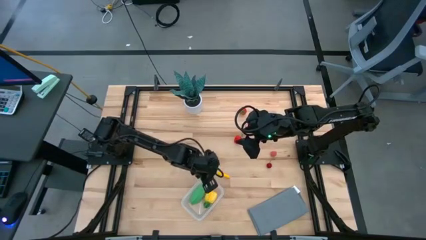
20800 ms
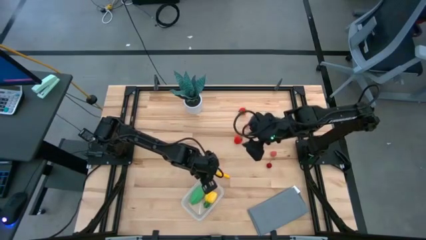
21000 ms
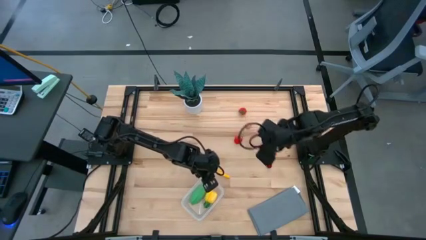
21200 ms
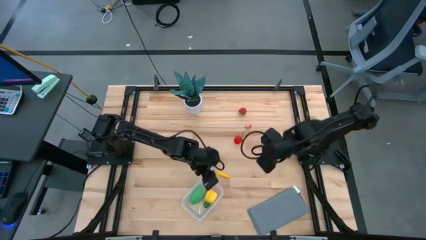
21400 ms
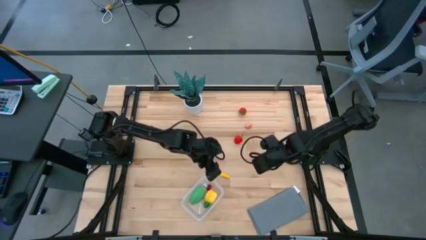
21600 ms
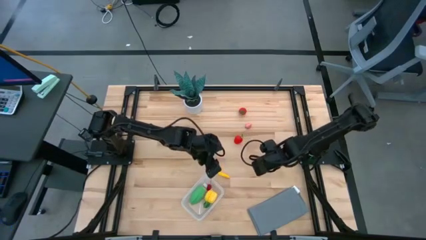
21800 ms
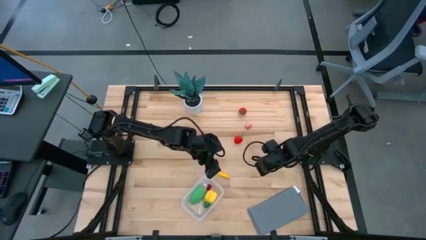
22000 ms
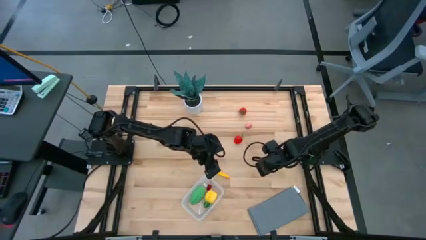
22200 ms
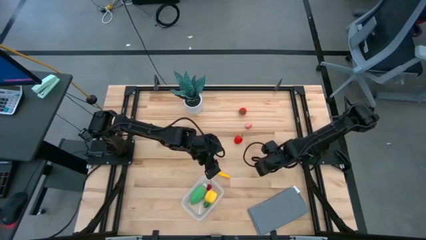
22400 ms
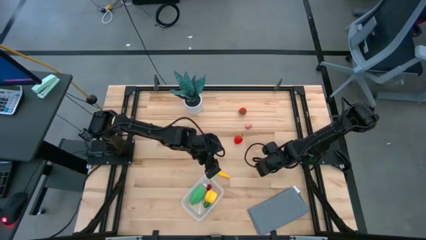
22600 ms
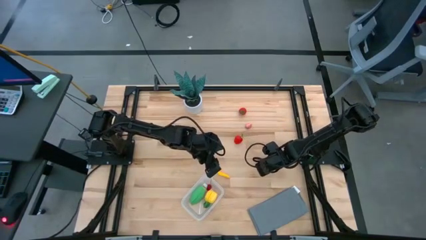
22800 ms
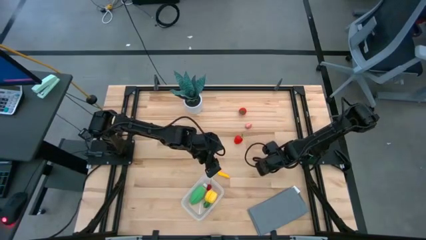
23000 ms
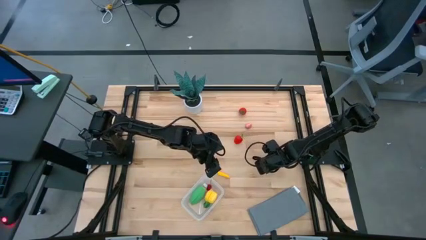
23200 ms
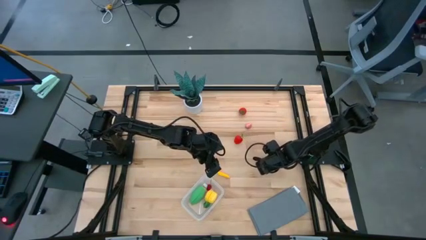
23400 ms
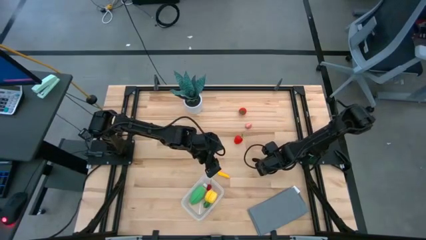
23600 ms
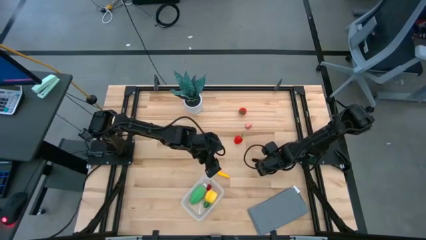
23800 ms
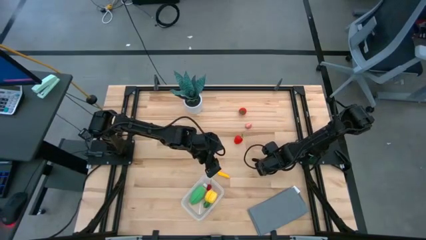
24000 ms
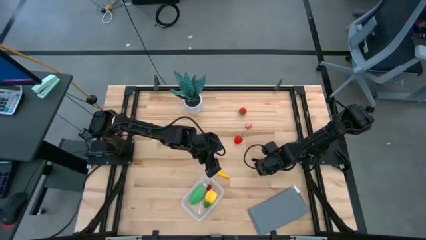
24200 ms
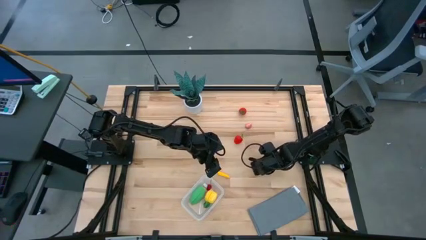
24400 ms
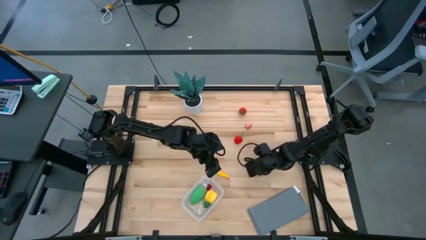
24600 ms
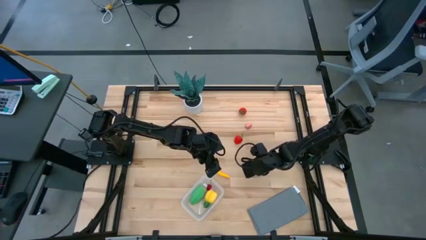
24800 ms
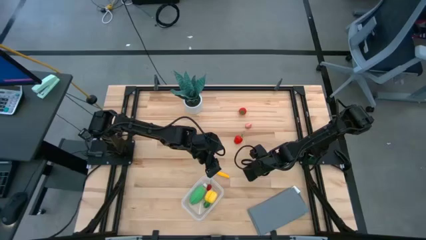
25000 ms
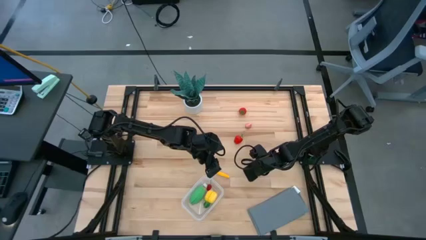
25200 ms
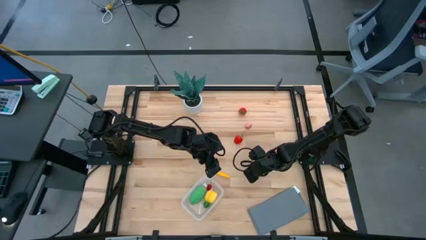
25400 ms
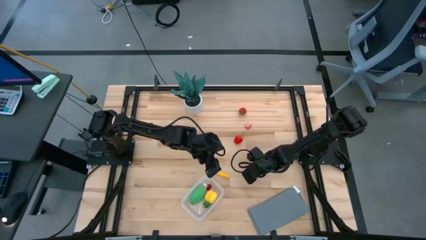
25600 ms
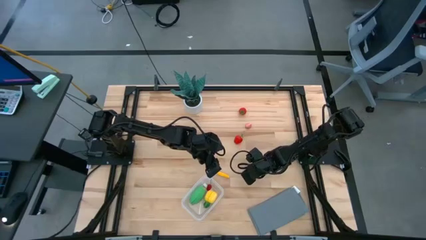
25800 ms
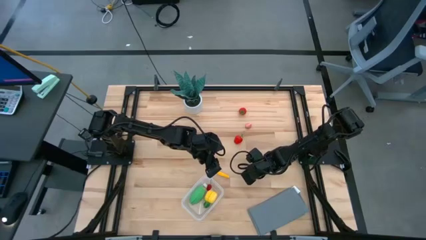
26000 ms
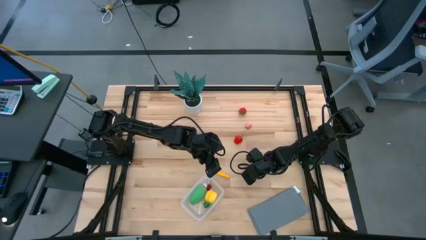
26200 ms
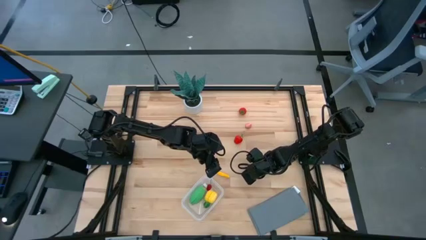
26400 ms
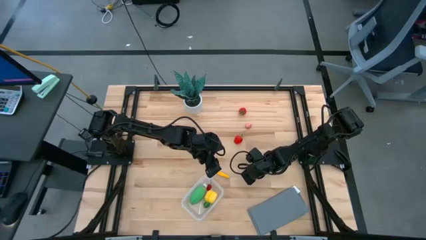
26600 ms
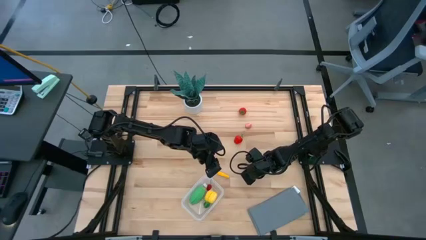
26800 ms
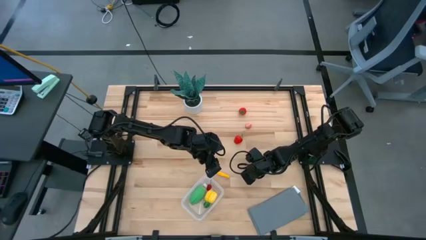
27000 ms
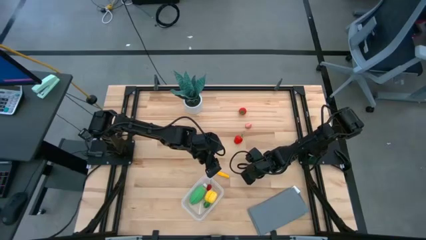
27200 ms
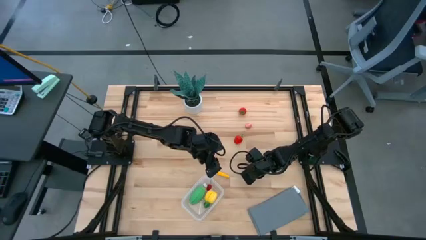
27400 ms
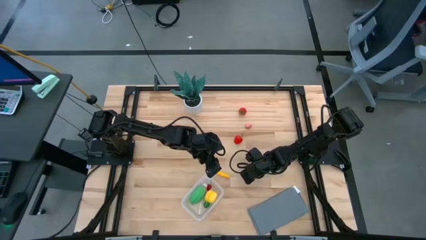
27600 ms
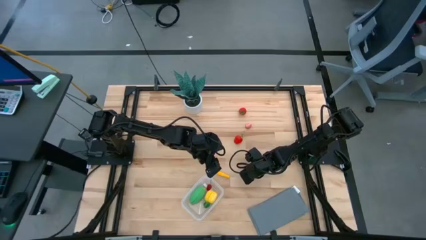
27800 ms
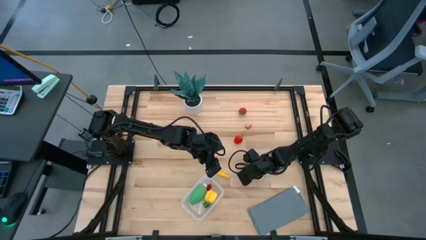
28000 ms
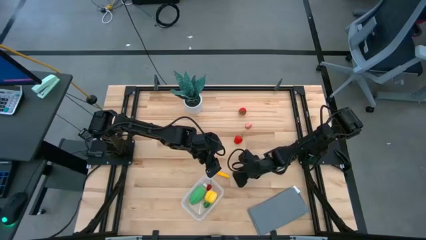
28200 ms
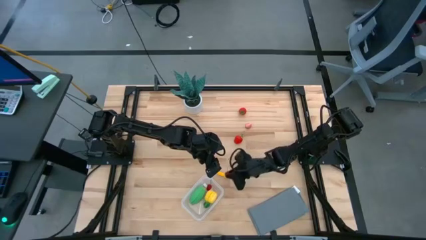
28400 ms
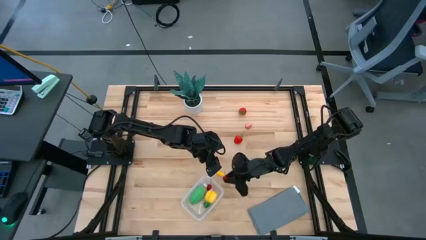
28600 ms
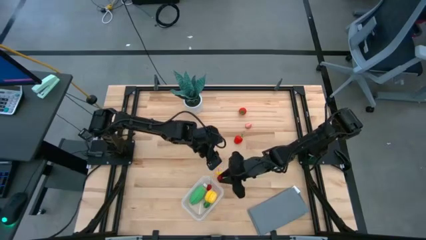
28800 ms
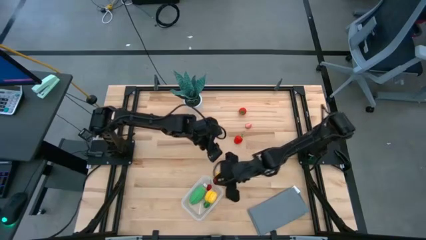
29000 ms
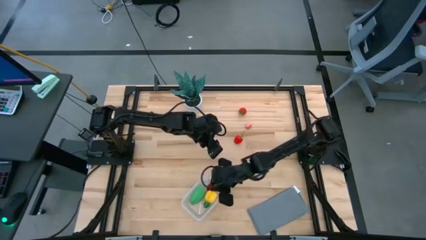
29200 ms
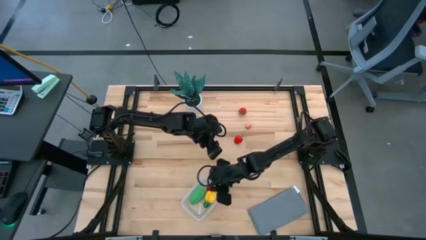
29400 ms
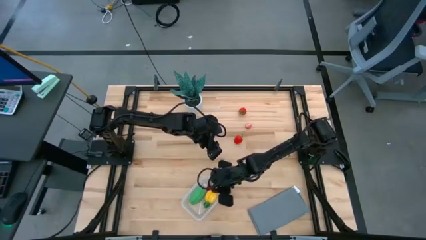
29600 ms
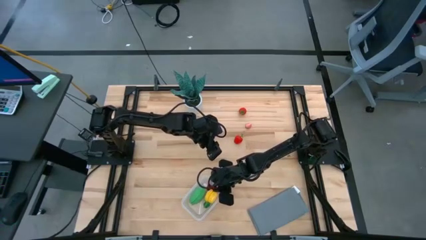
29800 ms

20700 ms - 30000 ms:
Task: Pick and placing Produce into tupperware
Put the red cherry into the transparent bin

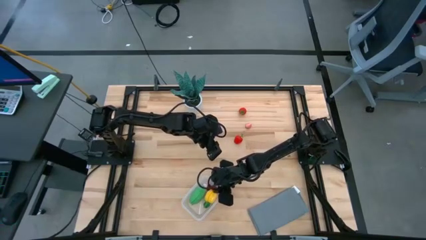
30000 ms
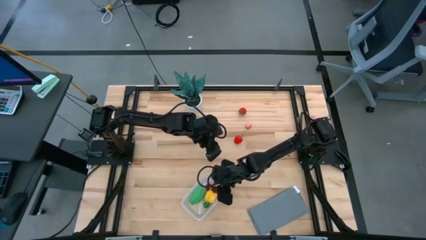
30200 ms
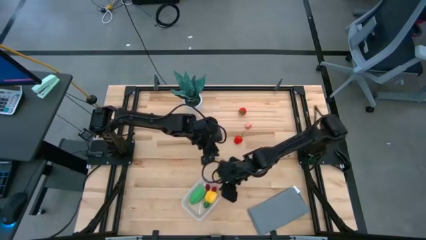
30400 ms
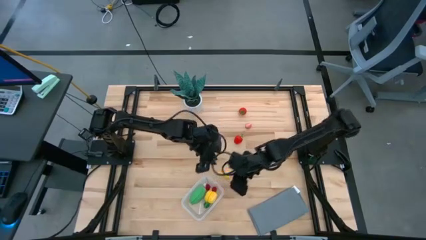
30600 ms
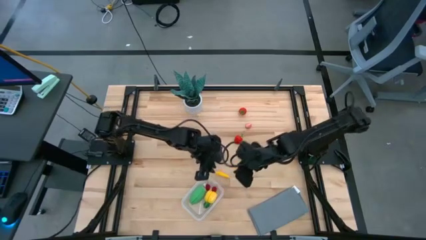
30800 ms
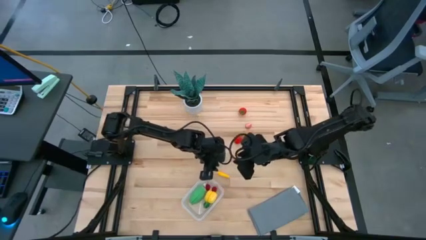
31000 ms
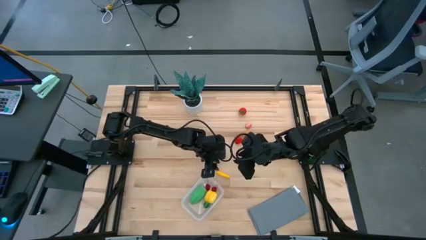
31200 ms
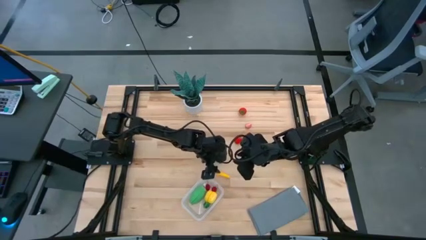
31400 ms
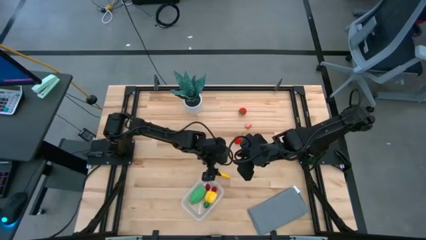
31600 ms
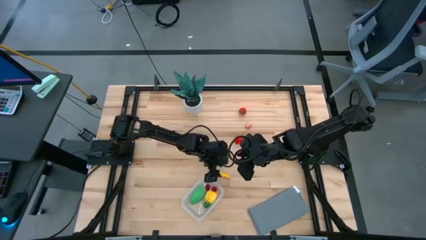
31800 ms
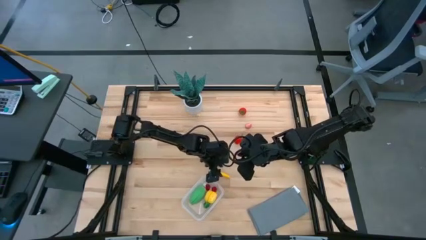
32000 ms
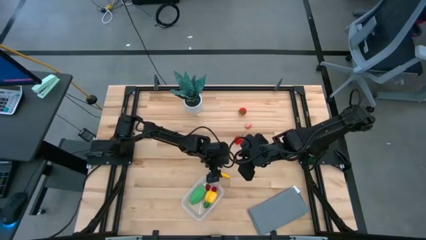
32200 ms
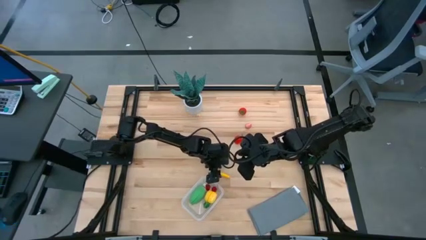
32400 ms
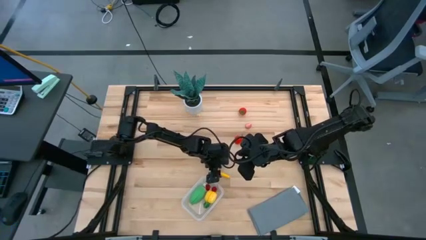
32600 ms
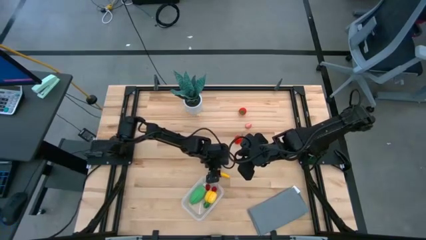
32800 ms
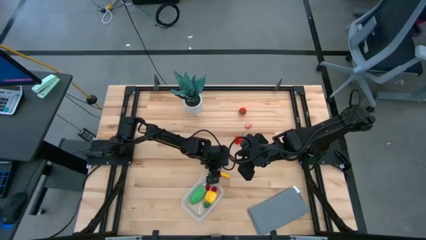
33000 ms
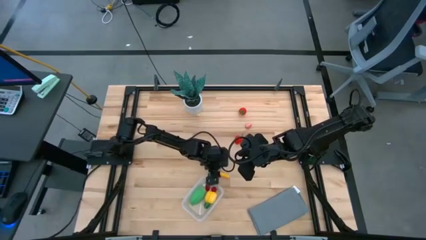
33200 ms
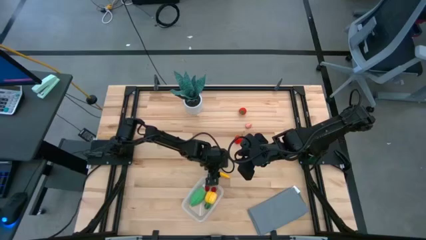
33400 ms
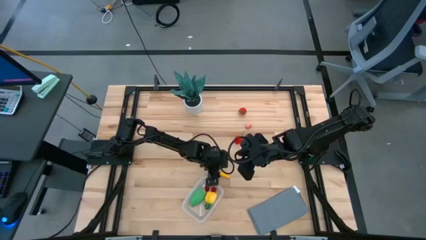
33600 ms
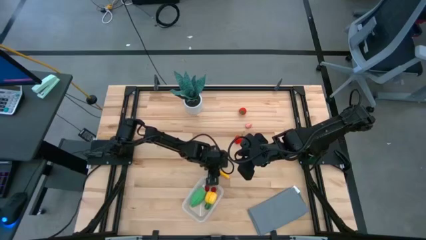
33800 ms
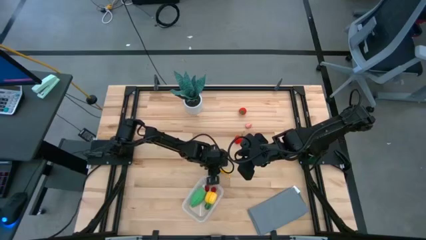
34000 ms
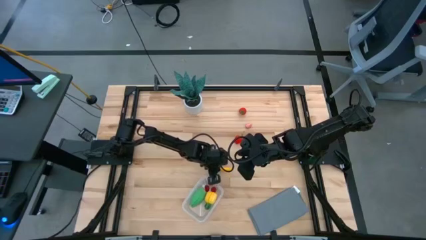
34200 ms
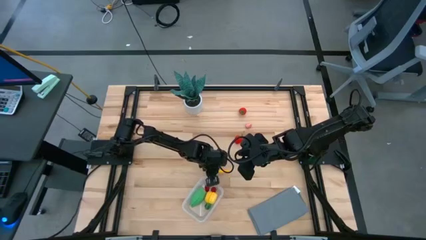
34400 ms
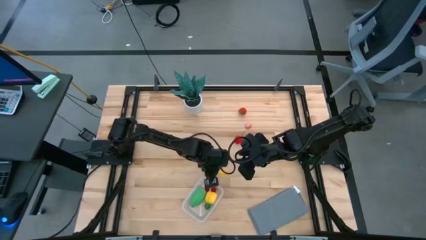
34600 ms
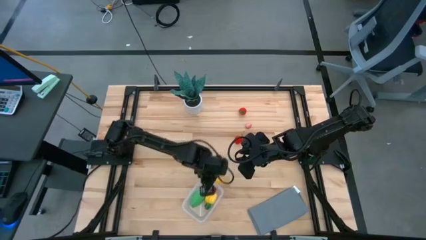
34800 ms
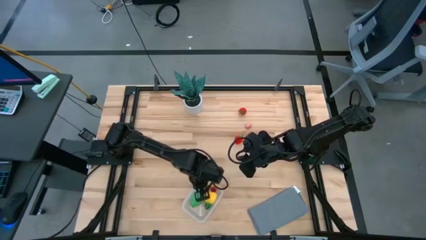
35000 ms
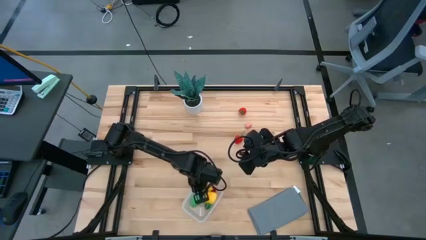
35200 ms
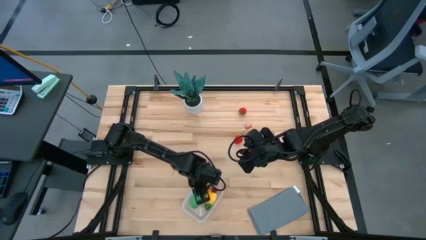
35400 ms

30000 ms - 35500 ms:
Put the yellow zucchini into the transparent bin

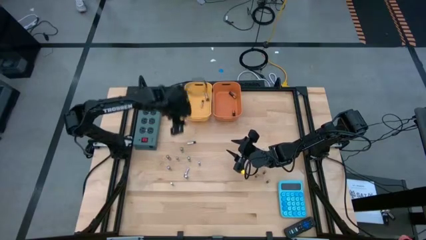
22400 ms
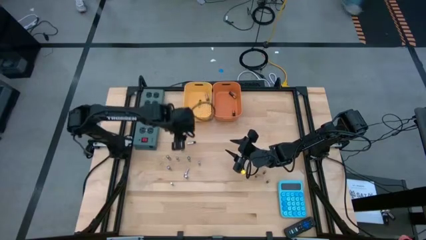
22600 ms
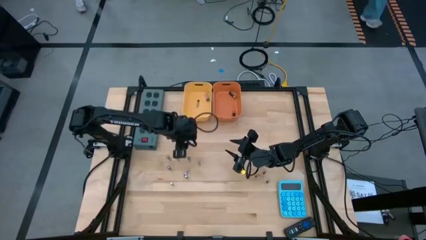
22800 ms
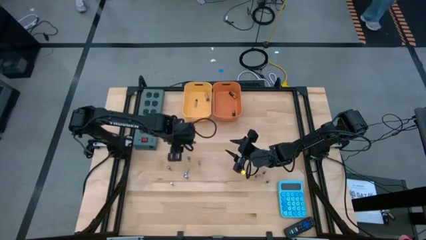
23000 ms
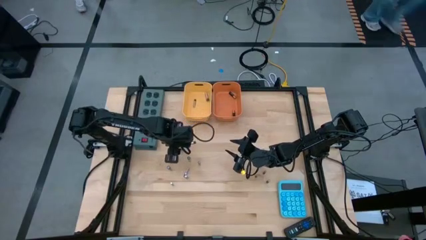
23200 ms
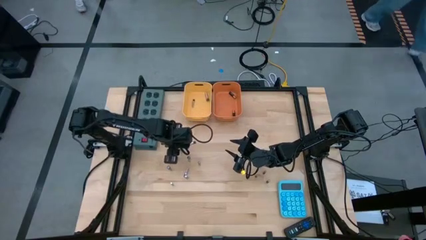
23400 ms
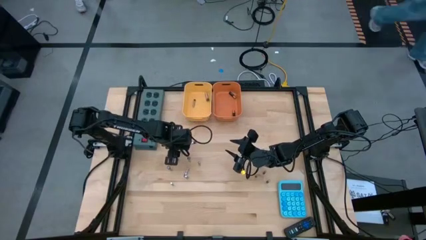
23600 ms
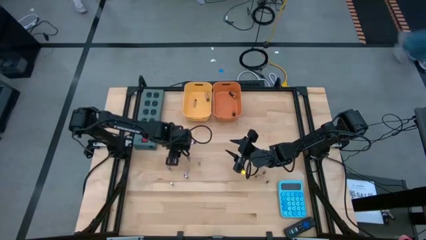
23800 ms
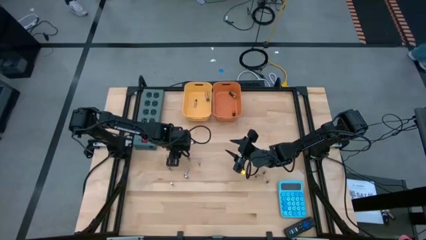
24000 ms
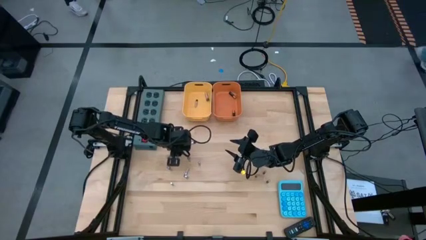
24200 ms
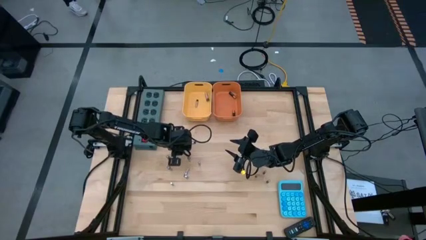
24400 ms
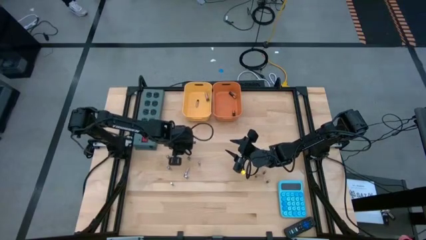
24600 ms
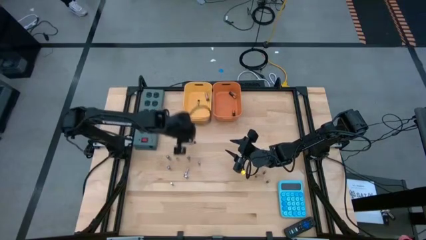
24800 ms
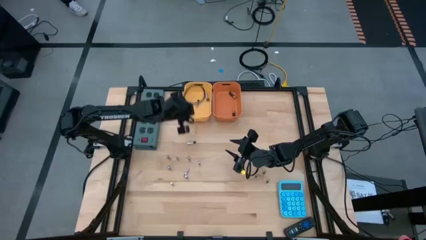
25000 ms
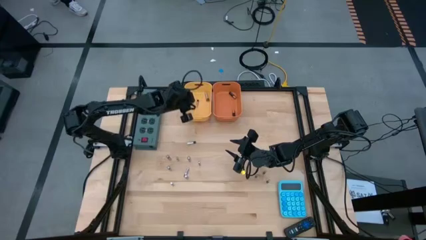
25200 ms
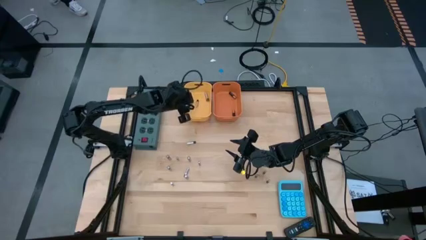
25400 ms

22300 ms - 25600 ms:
Task: Sort batteries
Put the silver battery into the yellow bin
